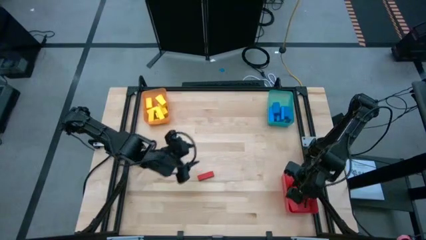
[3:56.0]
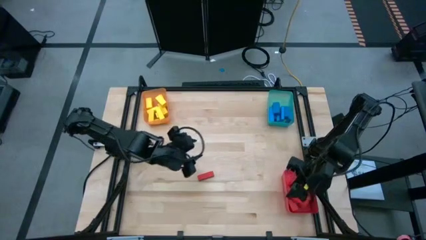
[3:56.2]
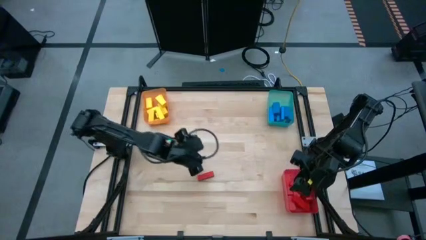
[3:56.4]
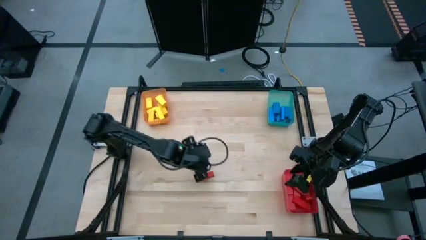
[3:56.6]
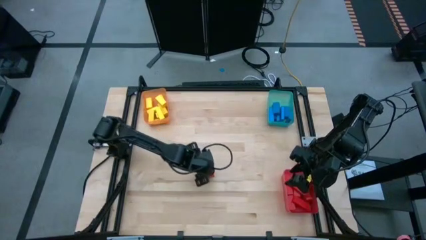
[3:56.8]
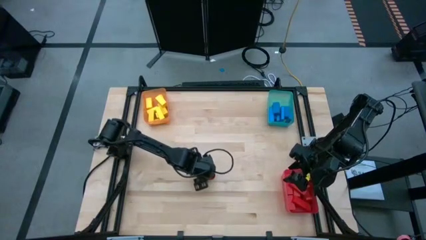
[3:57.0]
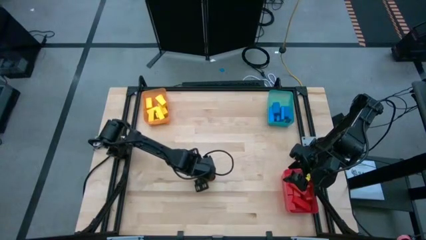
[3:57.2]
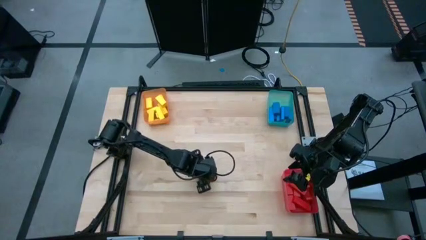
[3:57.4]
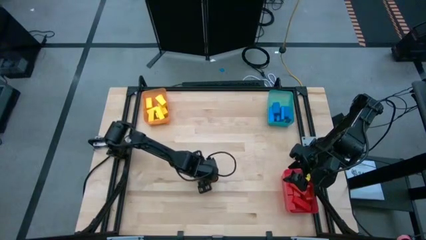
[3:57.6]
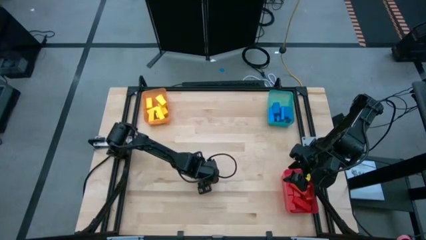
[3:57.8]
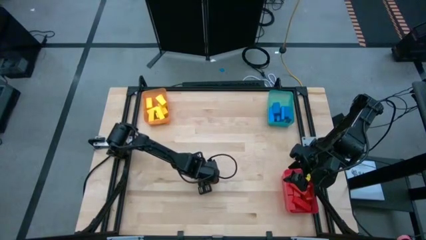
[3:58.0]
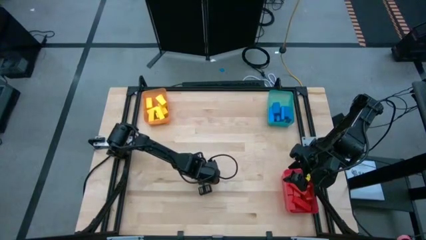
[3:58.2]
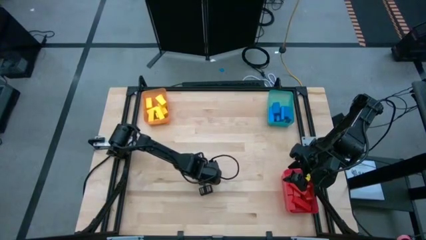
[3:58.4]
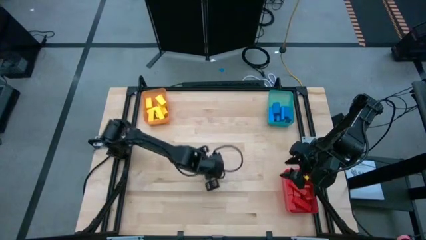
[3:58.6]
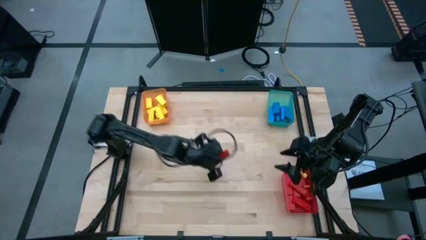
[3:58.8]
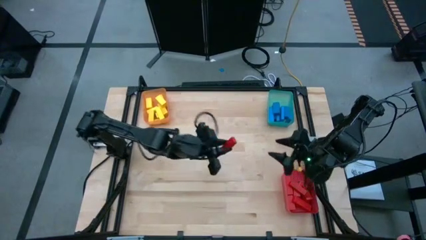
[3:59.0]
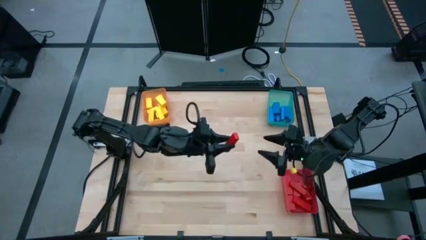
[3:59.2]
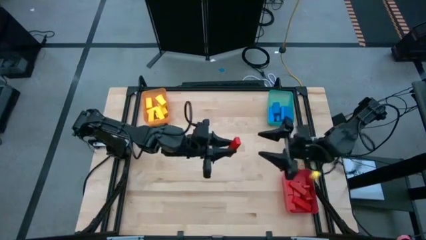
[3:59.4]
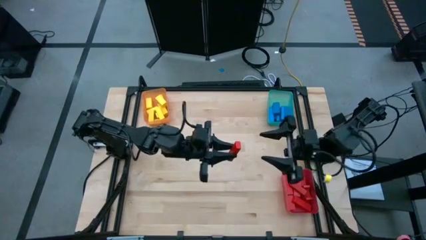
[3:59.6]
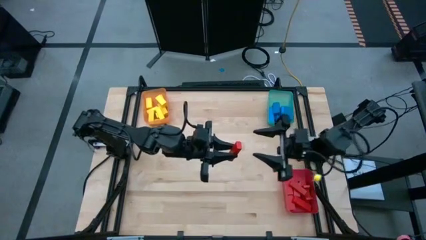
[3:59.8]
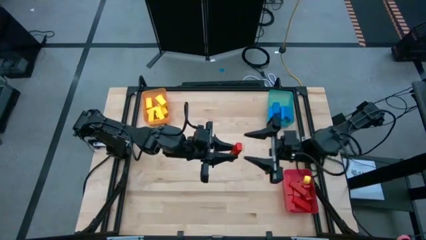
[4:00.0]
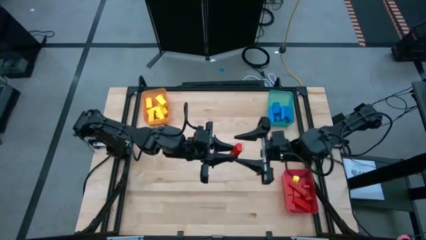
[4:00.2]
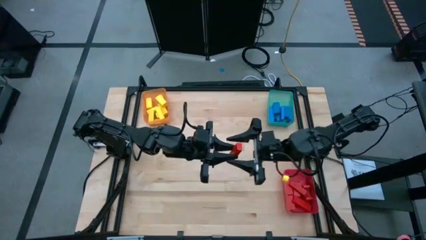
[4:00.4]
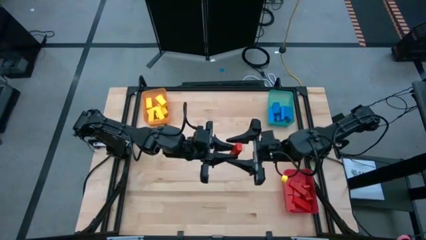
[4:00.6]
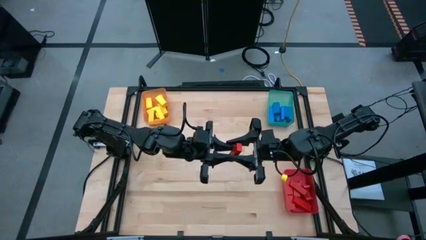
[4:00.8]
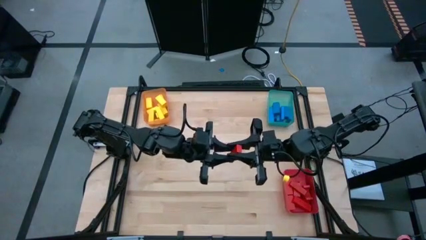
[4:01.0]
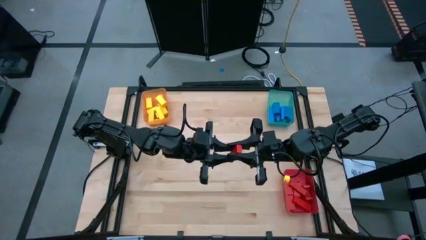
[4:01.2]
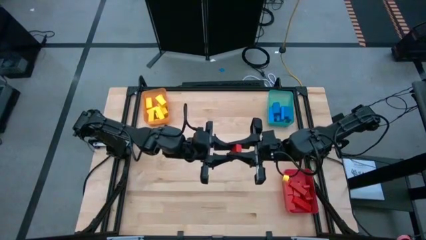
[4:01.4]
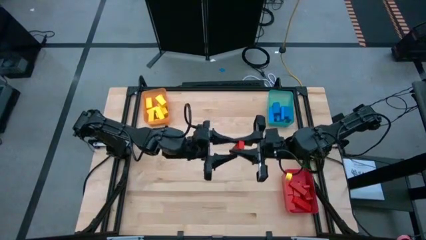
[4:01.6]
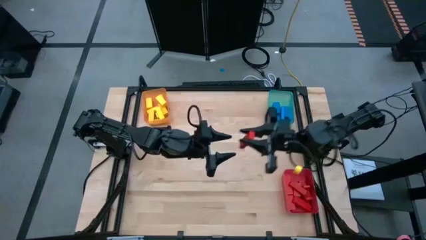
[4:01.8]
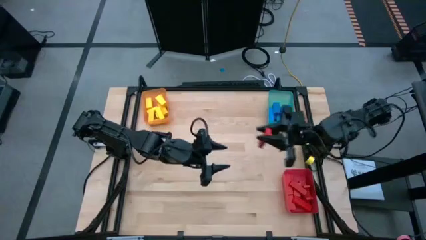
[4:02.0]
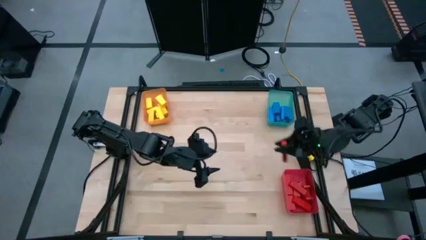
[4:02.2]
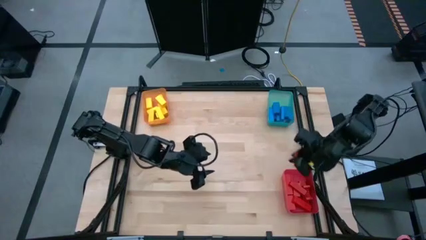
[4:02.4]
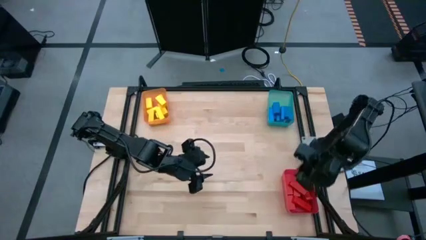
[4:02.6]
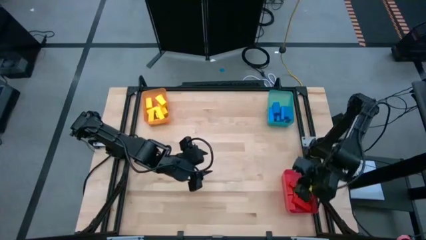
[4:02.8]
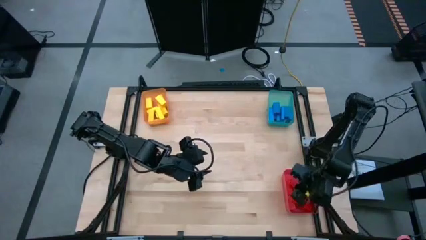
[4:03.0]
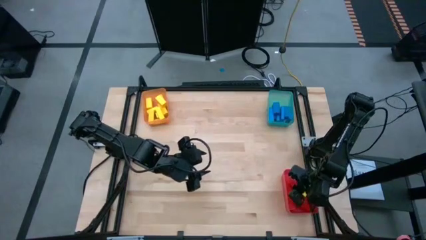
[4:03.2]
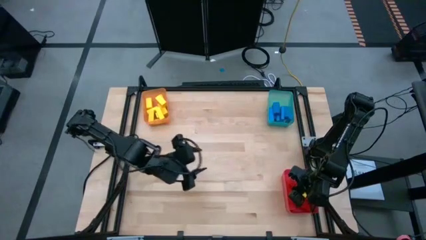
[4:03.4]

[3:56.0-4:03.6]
Task: Sort blocks
Put the red block into the red bin

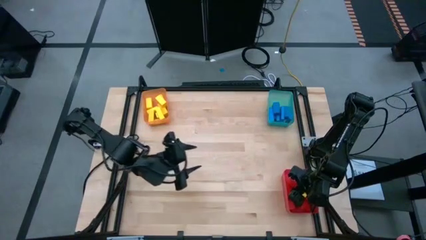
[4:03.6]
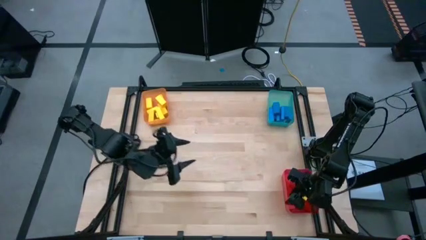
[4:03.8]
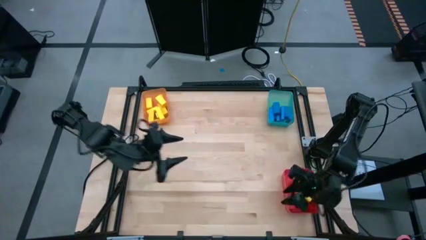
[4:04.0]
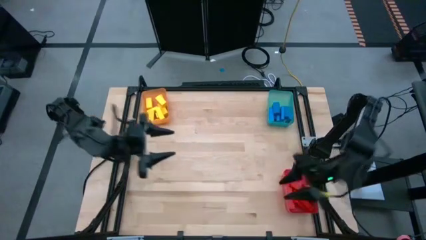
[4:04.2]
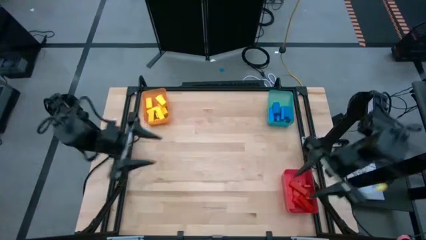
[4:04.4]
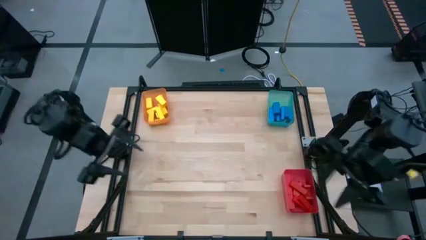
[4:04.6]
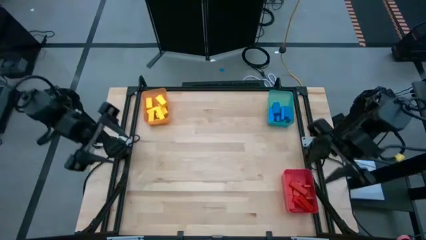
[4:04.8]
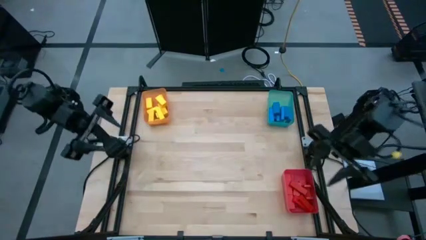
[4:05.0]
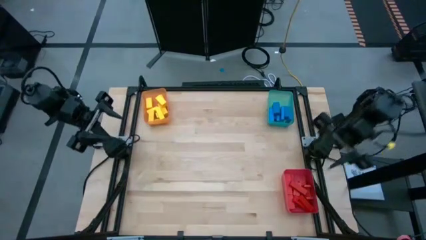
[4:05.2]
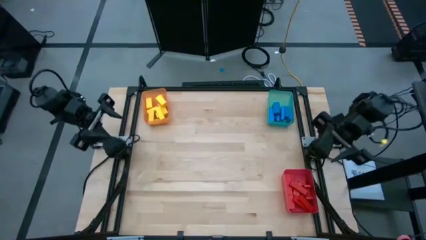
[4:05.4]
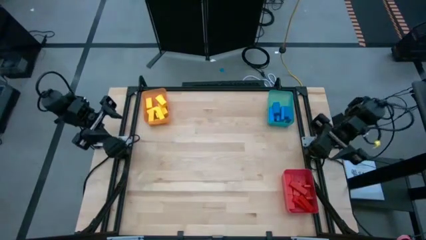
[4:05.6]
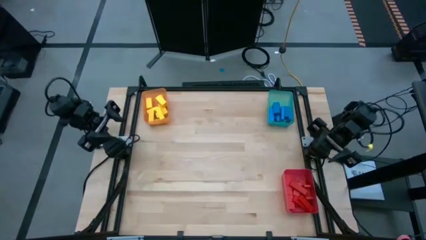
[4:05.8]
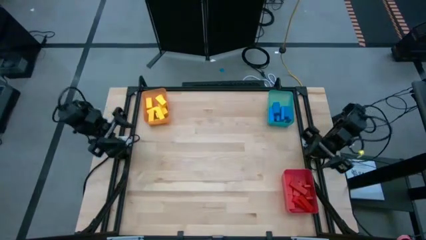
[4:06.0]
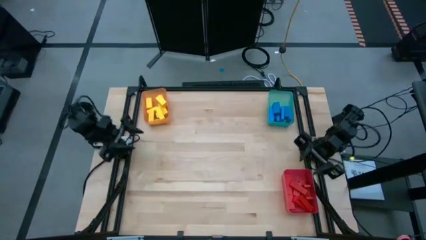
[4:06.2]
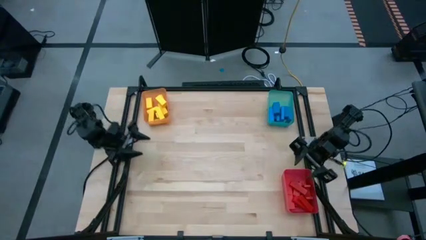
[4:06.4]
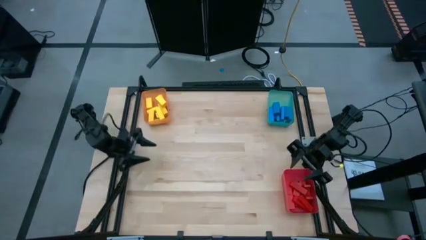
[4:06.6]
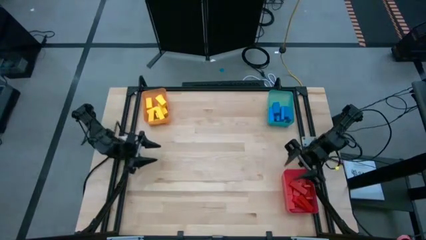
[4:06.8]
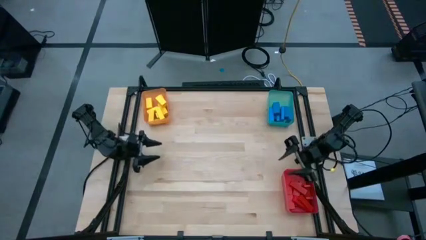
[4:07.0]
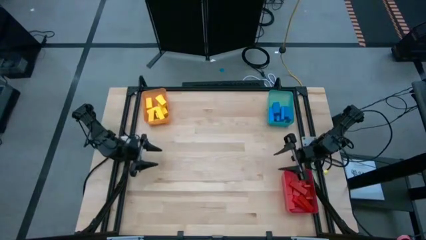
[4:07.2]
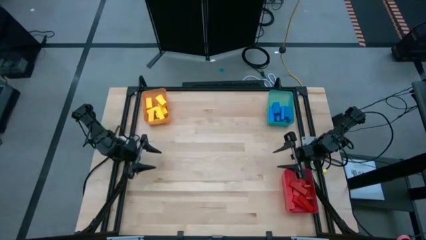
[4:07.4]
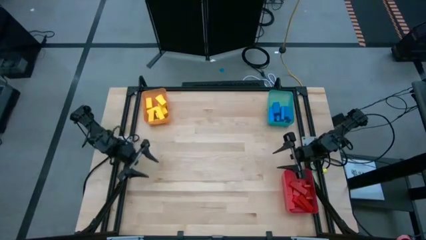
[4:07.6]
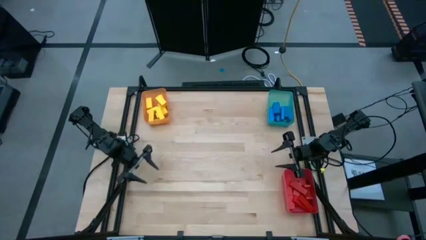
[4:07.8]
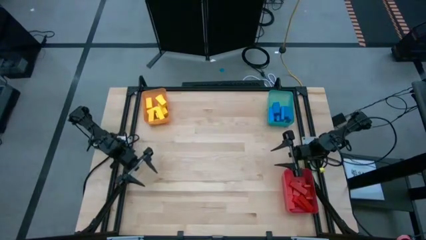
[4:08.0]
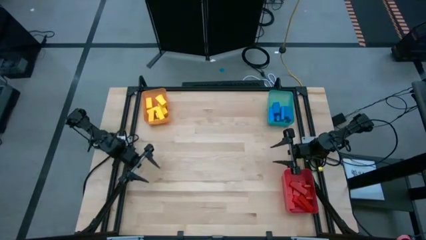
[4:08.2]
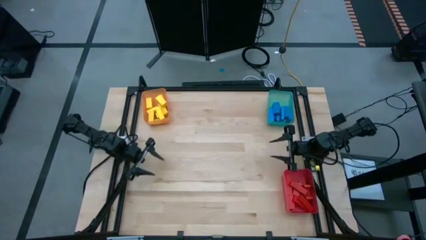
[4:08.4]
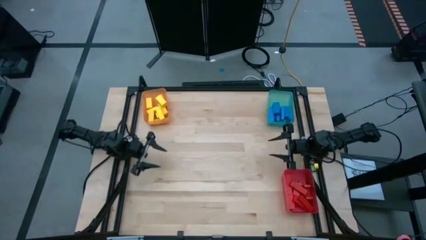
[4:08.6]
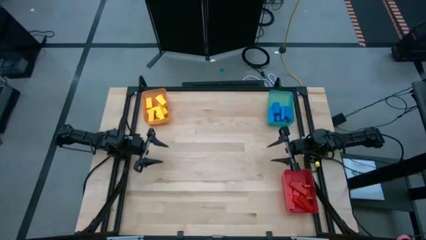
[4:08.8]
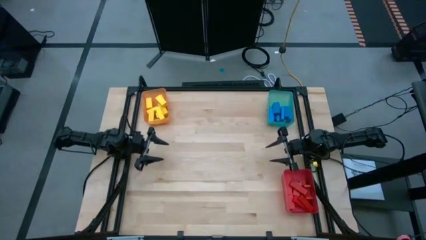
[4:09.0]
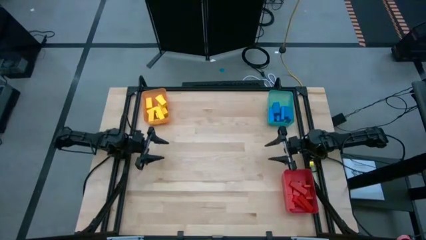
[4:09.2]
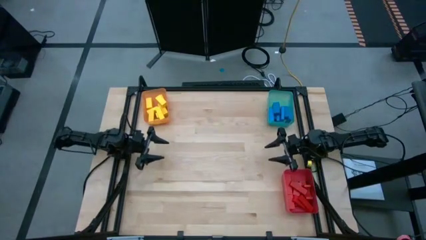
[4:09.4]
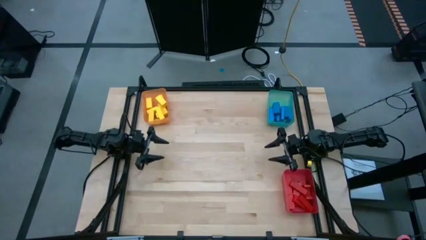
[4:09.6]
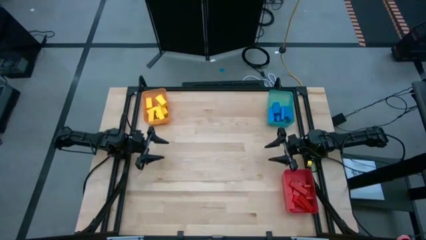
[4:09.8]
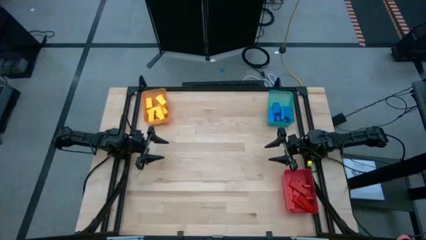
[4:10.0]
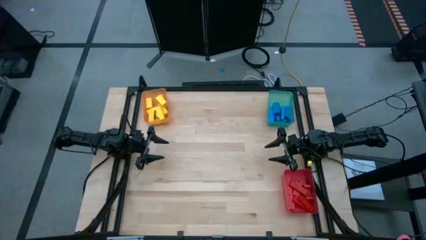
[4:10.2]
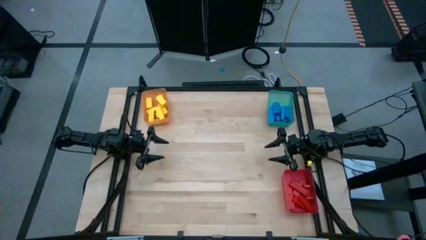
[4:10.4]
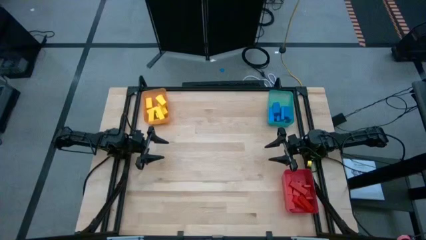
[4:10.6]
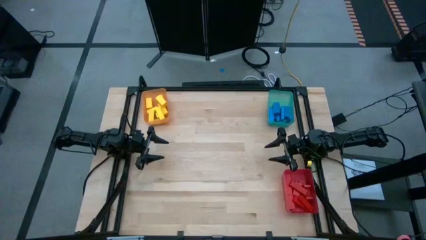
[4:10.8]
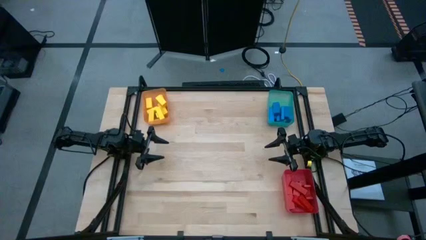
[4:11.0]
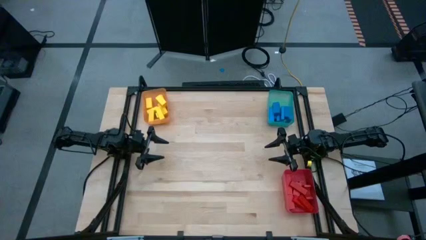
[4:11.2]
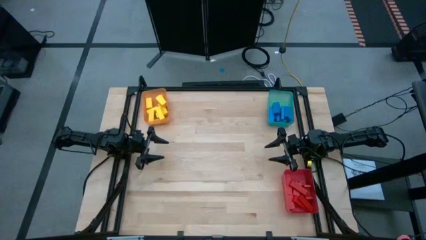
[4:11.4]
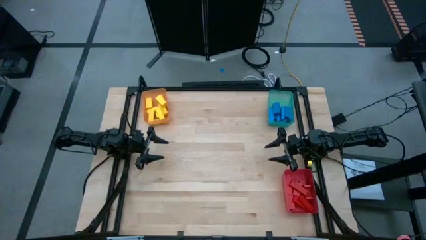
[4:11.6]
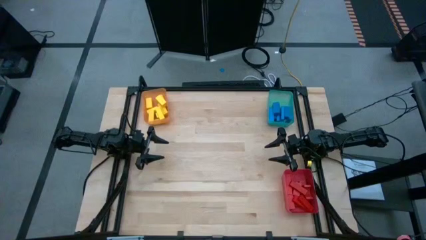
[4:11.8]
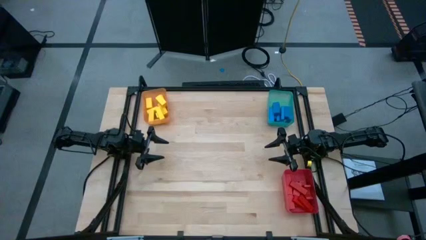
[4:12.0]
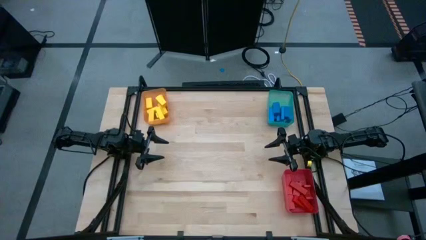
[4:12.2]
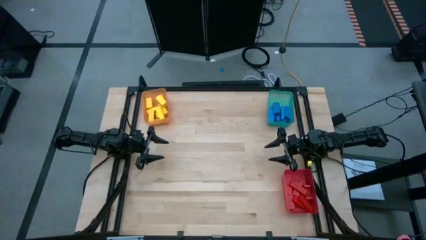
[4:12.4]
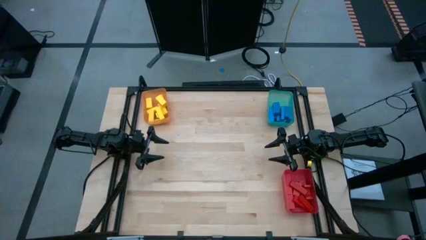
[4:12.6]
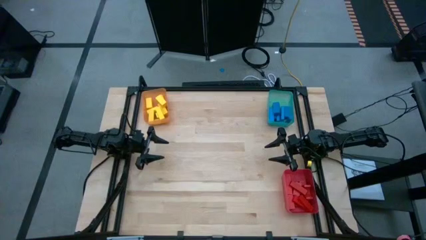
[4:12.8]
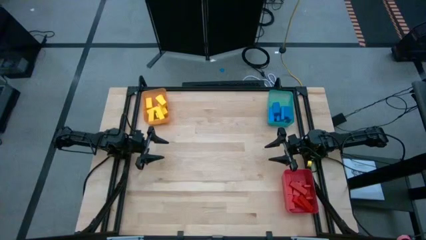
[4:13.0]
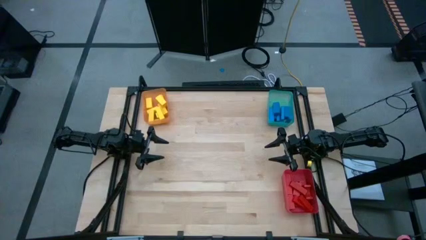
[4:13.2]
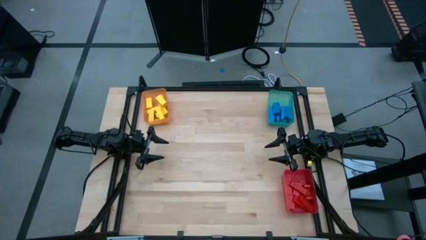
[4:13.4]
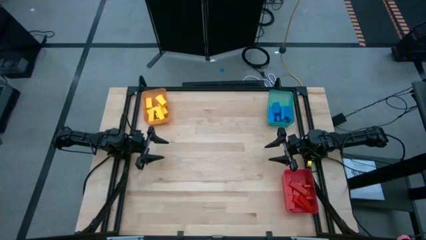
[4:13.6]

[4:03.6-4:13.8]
Return to Home Position
